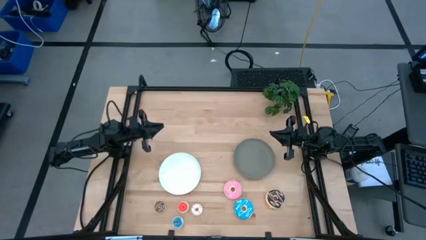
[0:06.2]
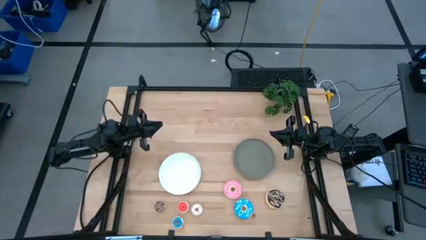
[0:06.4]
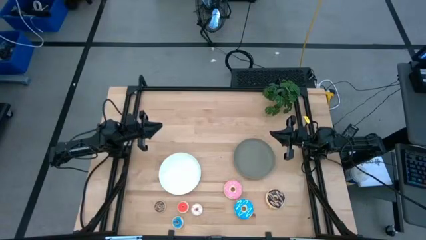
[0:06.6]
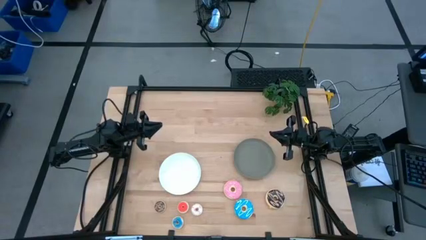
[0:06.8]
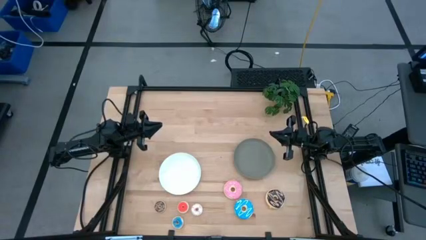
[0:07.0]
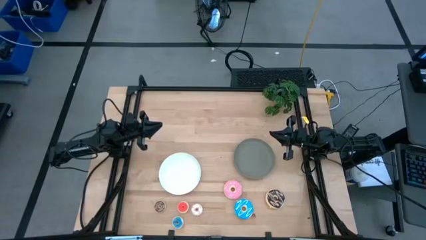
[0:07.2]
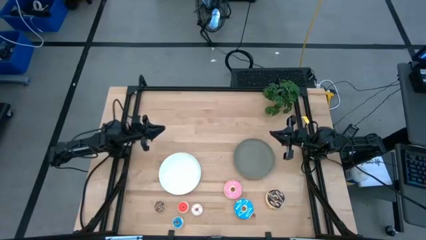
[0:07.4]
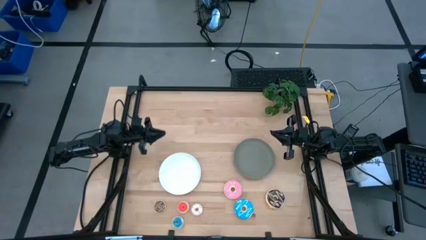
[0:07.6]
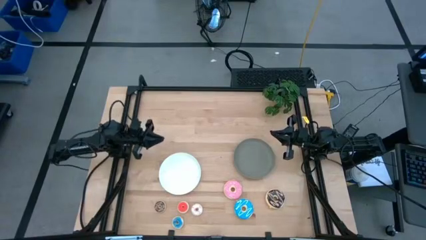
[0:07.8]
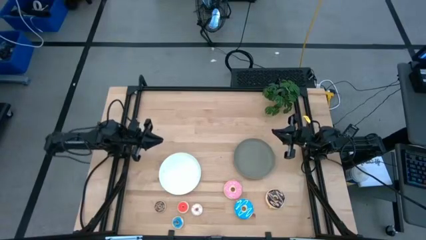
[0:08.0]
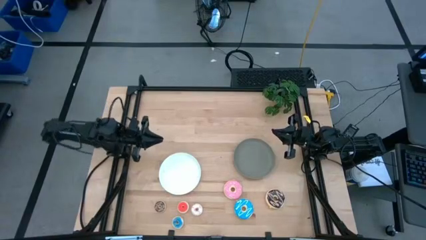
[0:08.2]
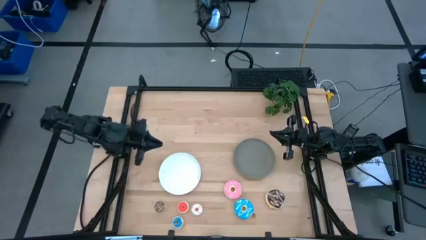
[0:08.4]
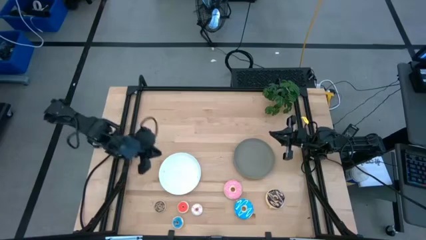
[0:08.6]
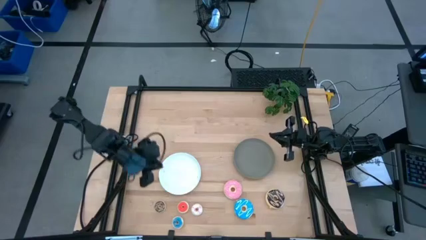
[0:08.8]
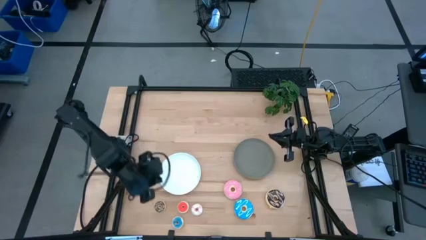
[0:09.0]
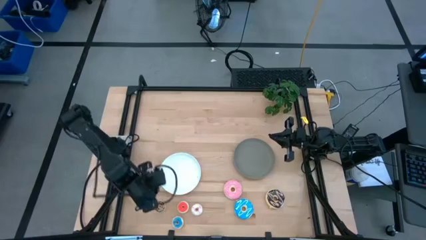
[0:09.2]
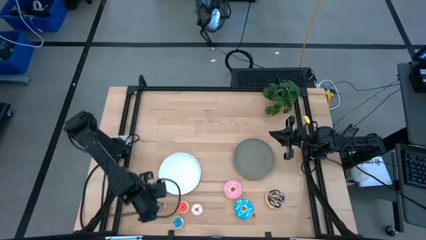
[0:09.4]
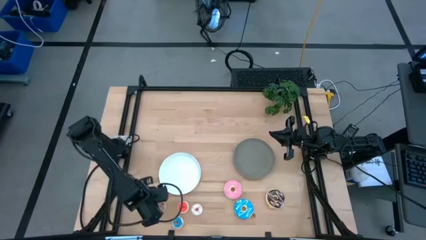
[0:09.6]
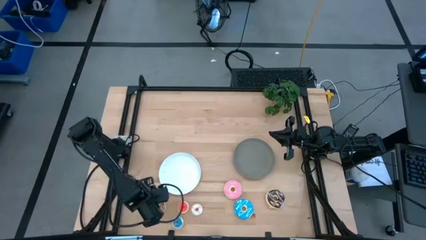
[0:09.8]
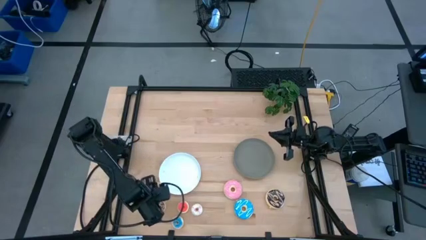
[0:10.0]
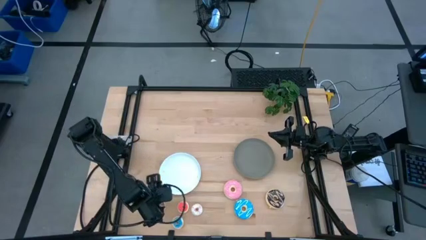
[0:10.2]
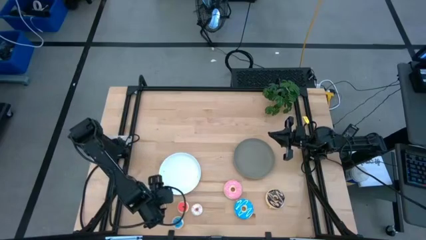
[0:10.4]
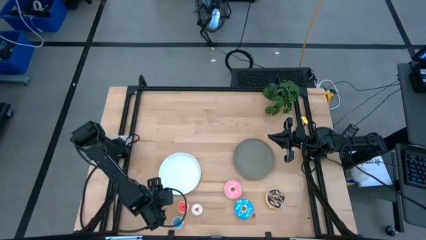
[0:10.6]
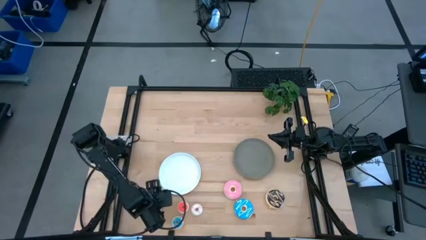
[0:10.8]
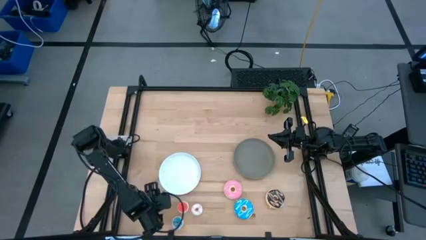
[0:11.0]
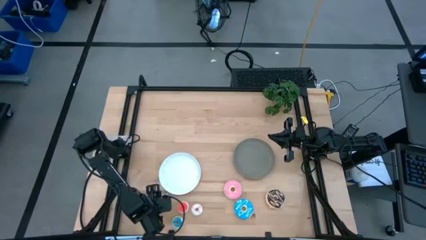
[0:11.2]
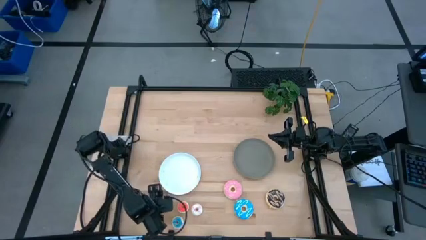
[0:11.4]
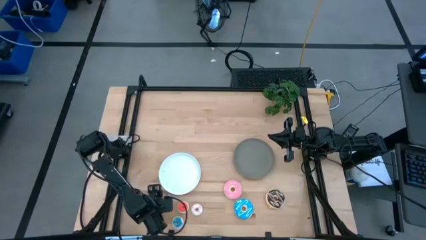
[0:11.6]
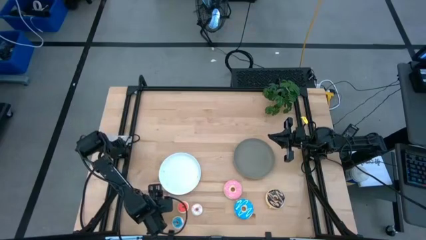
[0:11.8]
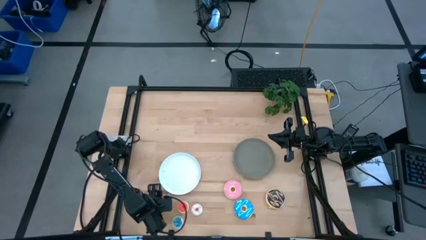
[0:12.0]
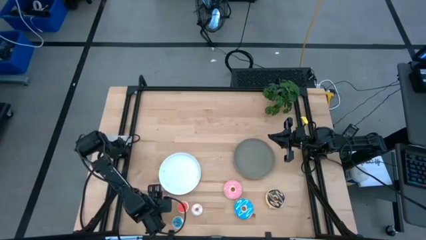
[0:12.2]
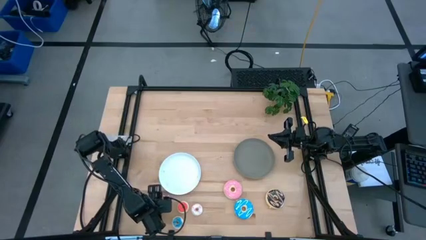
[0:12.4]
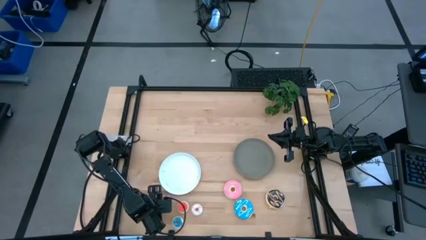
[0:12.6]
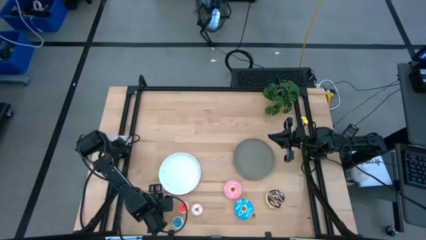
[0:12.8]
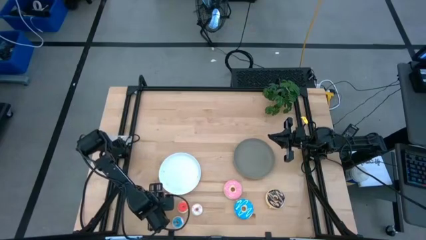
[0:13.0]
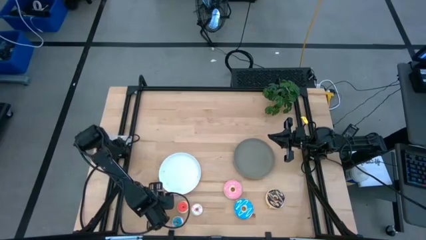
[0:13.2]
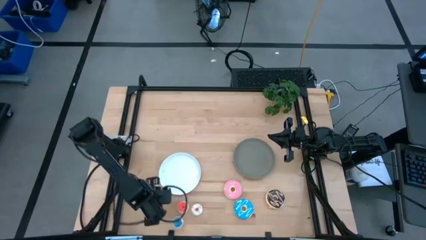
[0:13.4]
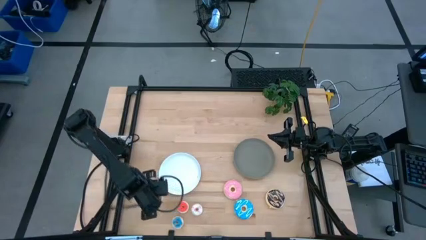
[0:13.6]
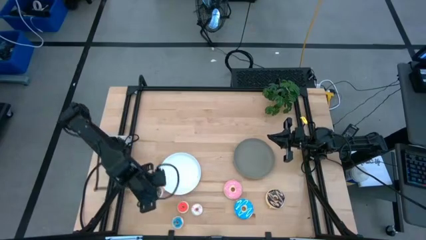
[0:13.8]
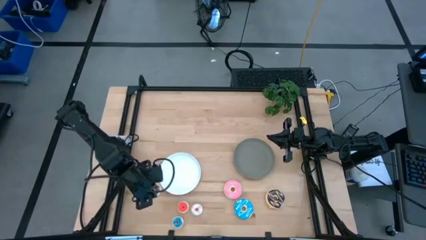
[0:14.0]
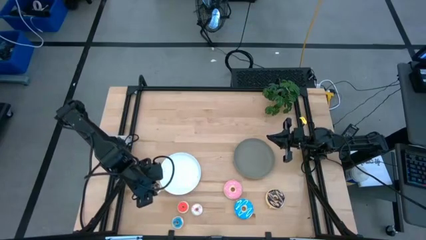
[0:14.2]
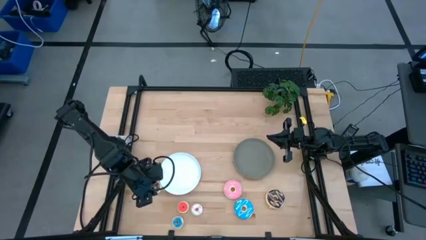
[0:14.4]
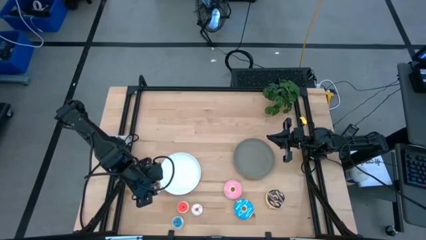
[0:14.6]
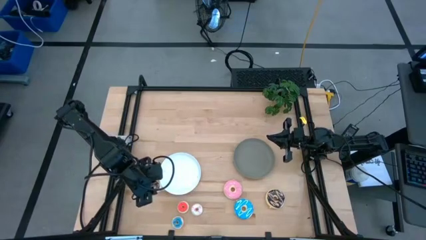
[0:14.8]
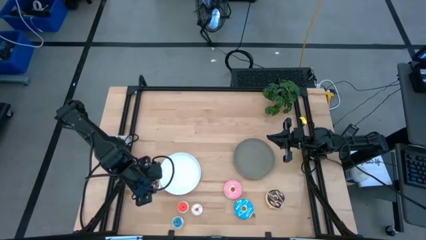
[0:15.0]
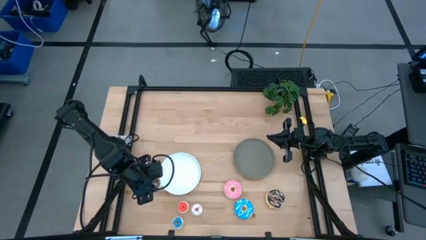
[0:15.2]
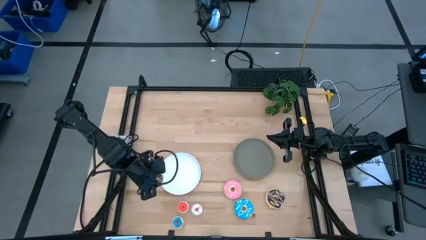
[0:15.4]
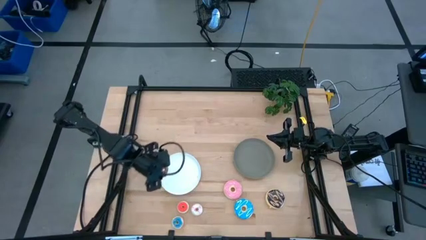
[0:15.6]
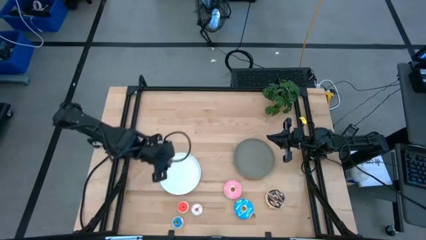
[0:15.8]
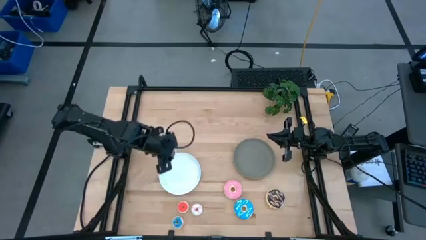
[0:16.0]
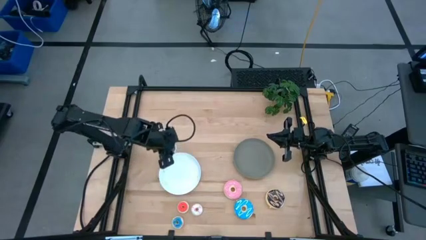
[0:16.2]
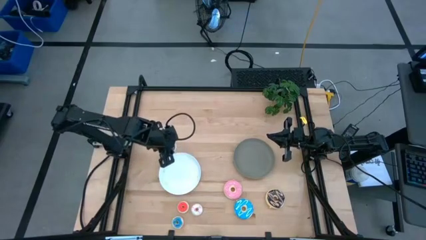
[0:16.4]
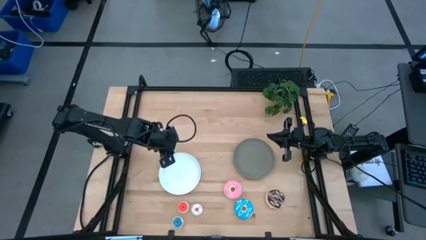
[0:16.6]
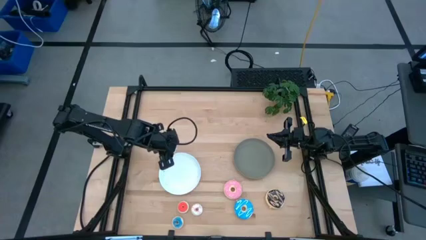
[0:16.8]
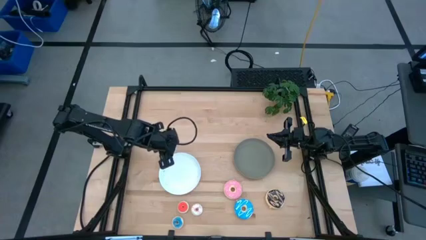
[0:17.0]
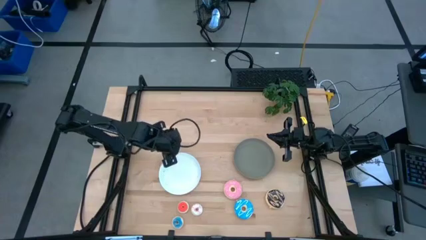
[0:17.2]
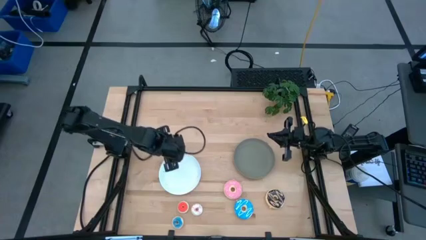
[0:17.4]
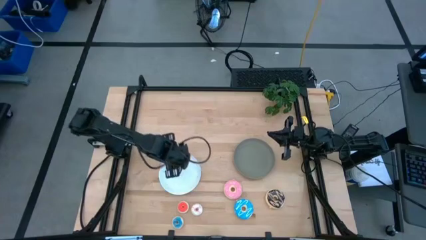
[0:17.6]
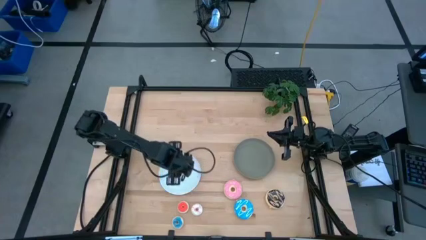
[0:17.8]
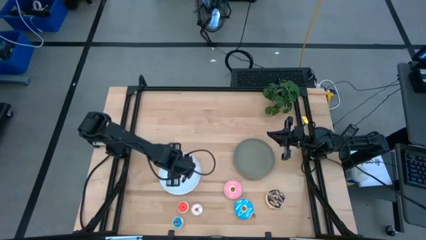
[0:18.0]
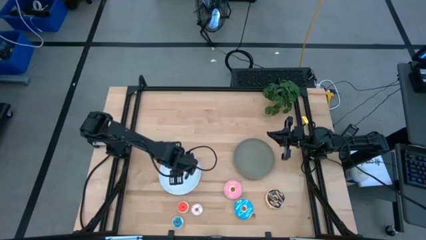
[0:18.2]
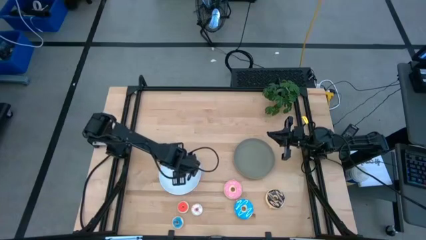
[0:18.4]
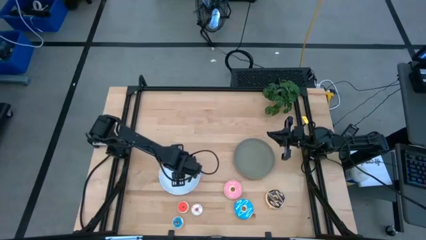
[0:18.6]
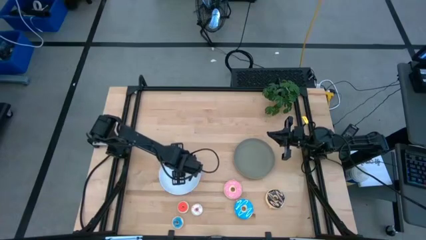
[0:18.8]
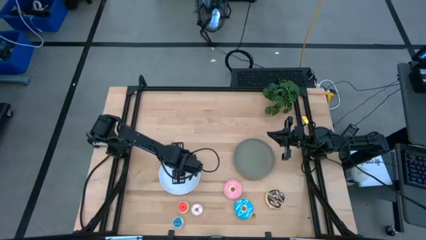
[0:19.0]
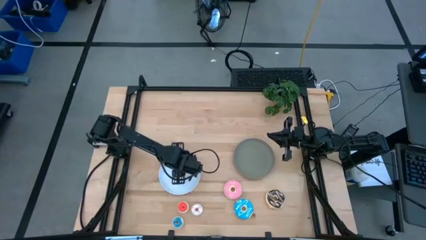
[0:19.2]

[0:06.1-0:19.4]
Task: Pick & Place donuts
Put the small brown donut on the white plate

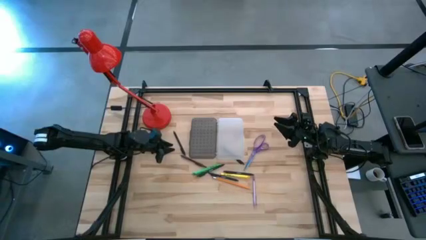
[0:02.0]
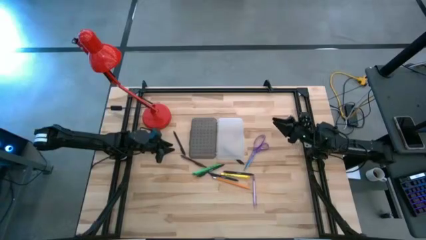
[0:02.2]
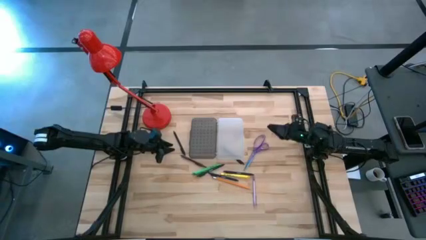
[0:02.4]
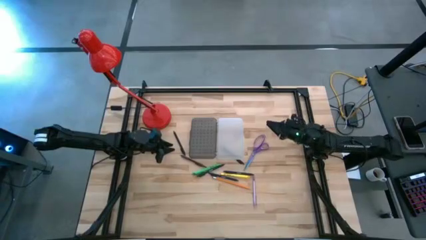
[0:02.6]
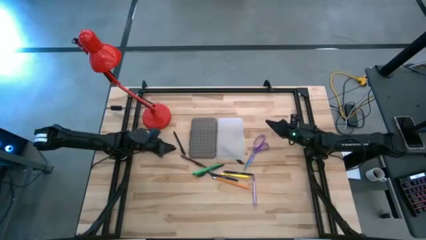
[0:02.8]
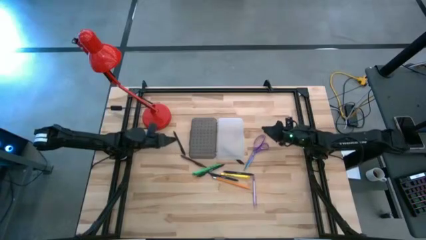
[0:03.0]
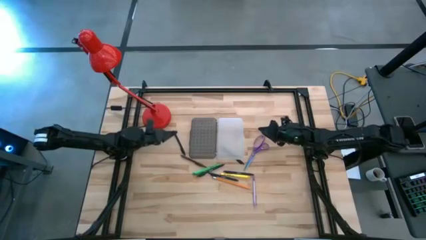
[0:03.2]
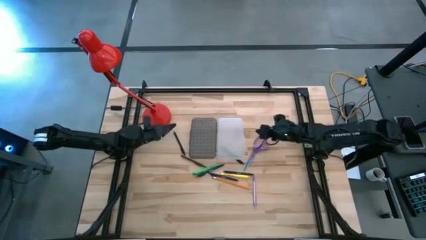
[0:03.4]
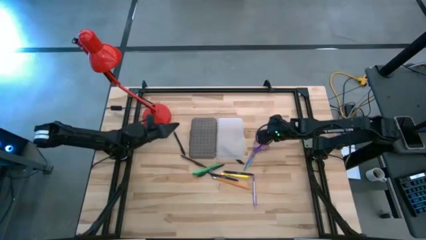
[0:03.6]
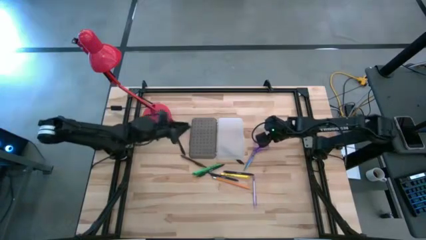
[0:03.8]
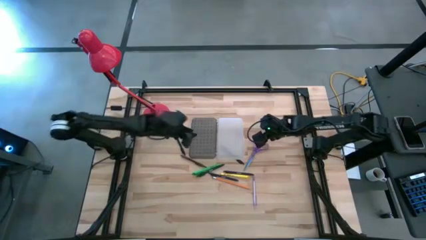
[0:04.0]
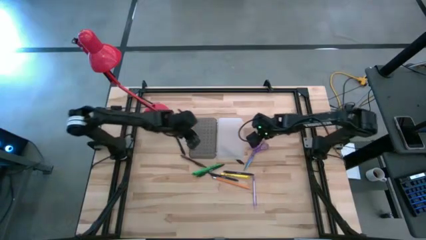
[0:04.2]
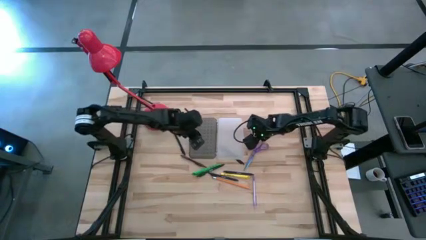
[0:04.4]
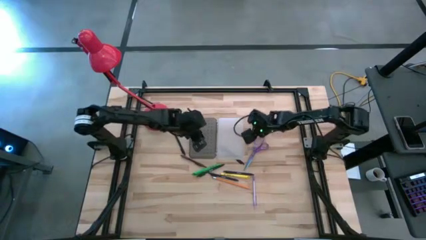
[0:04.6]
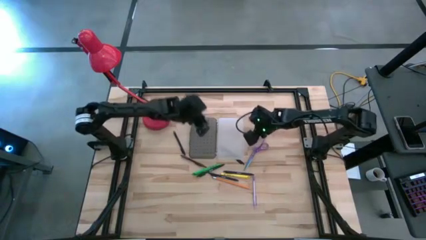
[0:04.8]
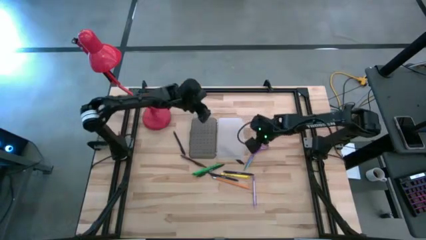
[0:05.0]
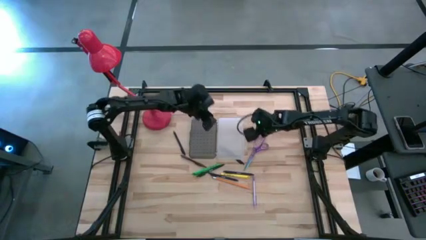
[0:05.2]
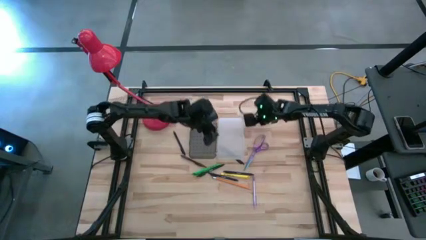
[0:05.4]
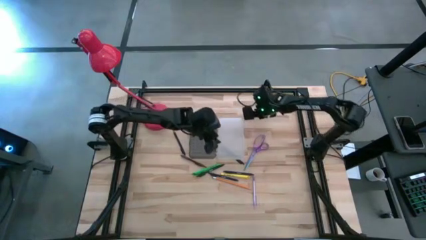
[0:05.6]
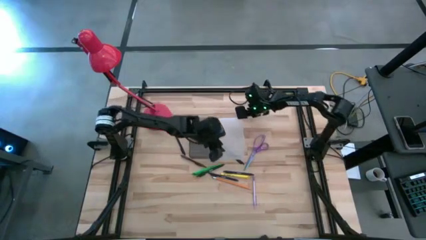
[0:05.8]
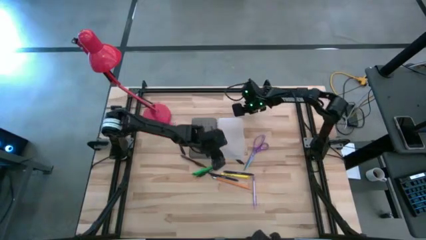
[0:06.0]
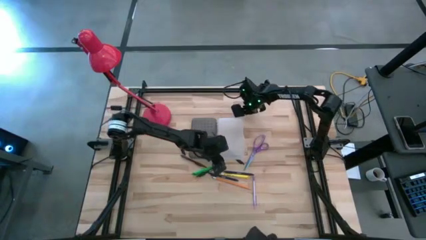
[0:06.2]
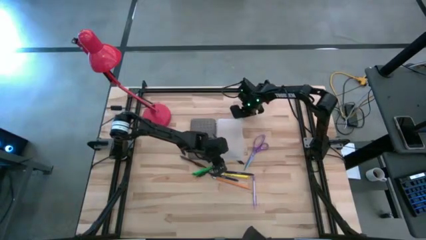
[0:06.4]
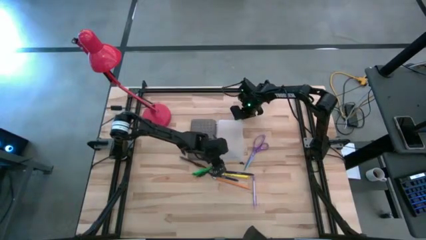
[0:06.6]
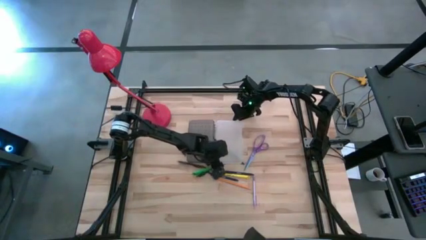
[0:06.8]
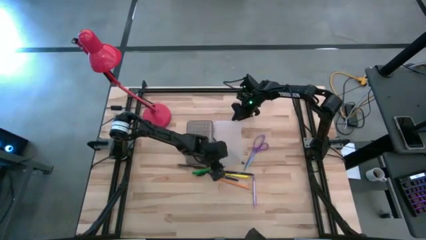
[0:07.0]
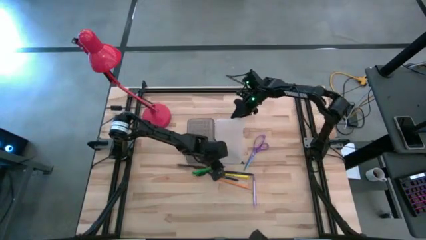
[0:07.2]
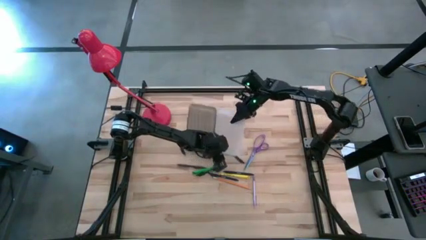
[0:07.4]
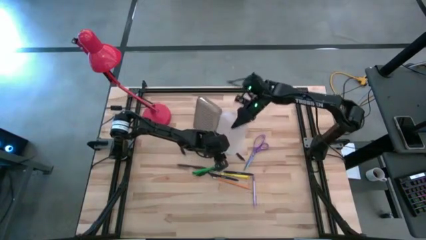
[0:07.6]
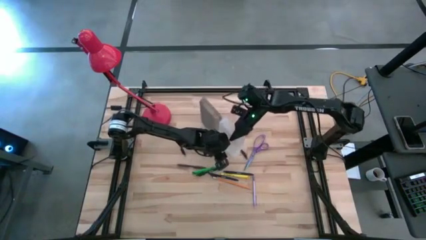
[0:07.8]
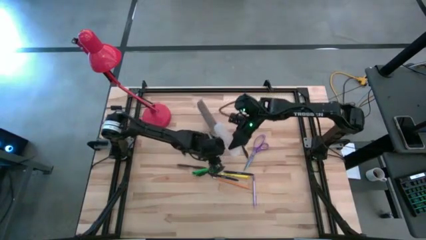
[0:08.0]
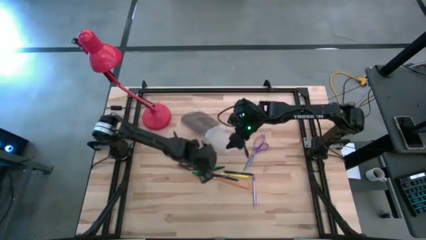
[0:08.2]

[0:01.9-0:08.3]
Task: Pick & place school supplies into a supply box
Prepare the supply box to put school supplies into it
